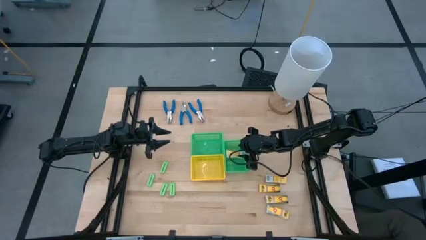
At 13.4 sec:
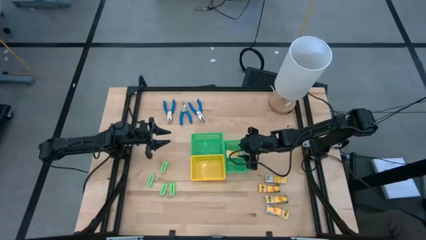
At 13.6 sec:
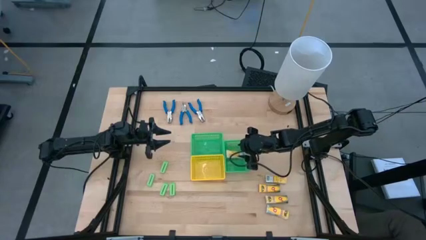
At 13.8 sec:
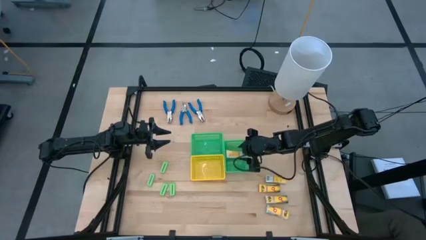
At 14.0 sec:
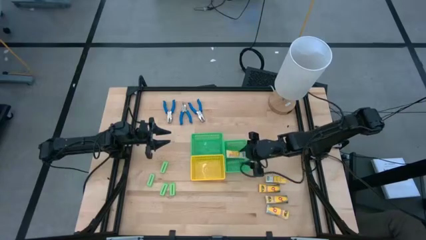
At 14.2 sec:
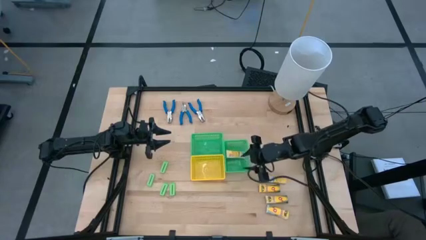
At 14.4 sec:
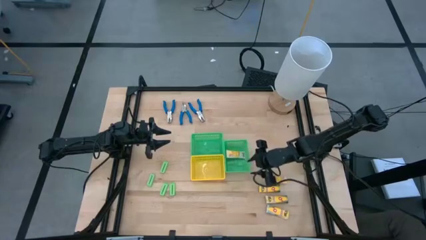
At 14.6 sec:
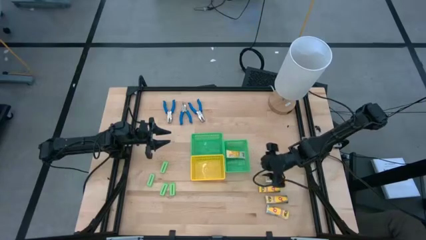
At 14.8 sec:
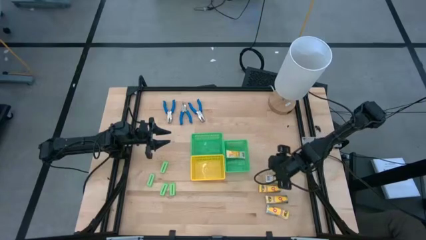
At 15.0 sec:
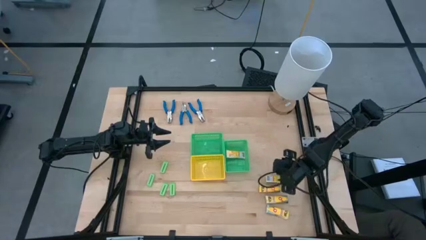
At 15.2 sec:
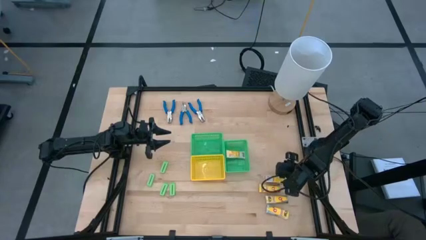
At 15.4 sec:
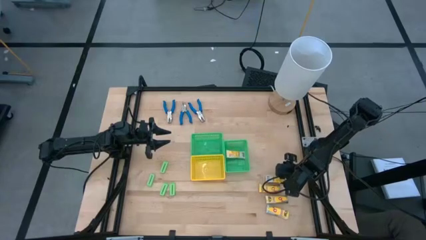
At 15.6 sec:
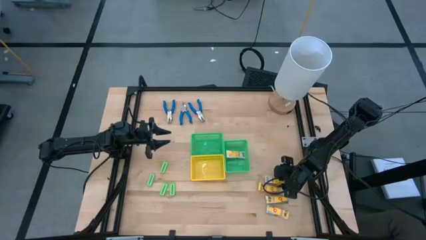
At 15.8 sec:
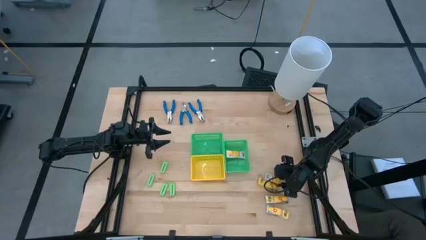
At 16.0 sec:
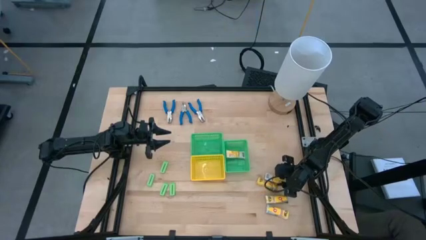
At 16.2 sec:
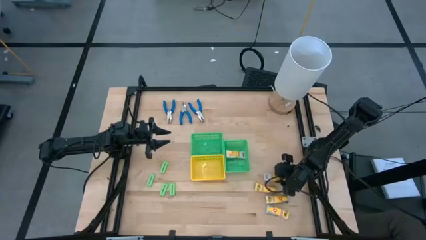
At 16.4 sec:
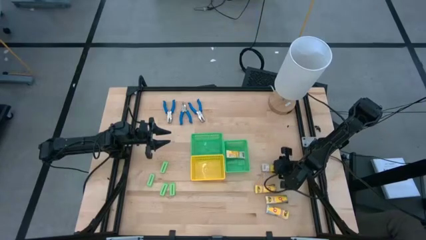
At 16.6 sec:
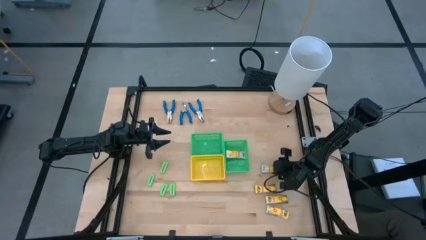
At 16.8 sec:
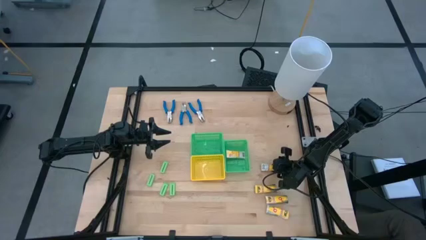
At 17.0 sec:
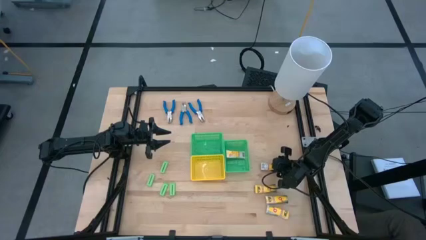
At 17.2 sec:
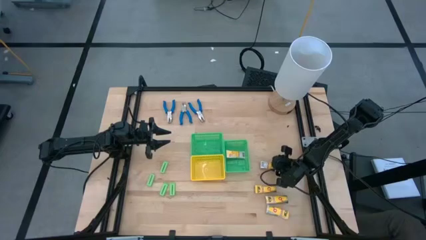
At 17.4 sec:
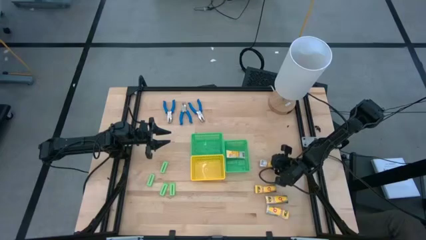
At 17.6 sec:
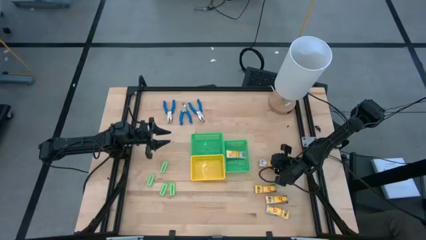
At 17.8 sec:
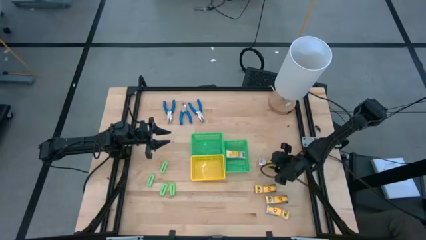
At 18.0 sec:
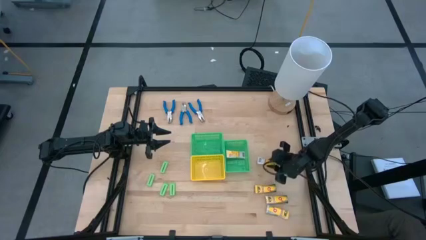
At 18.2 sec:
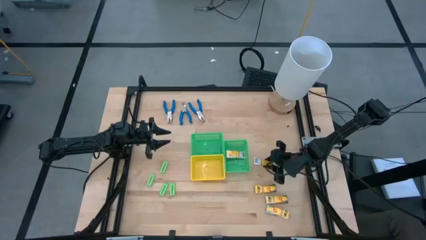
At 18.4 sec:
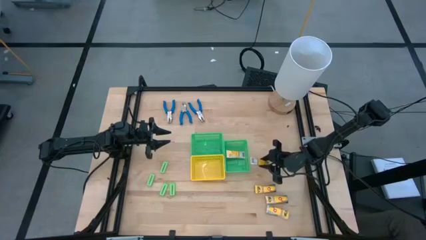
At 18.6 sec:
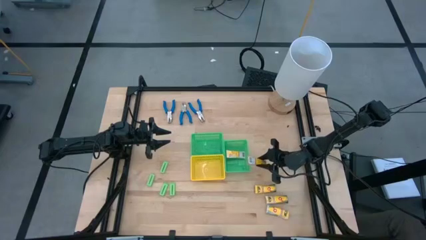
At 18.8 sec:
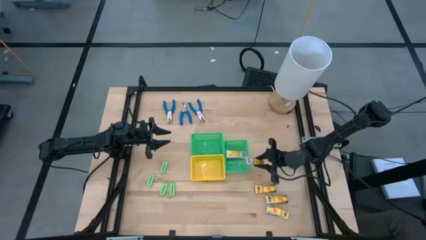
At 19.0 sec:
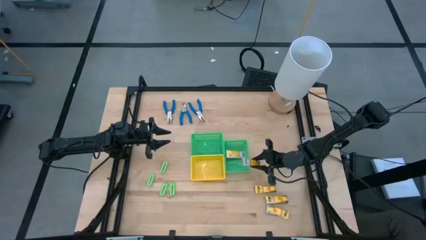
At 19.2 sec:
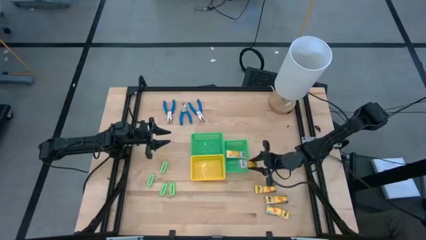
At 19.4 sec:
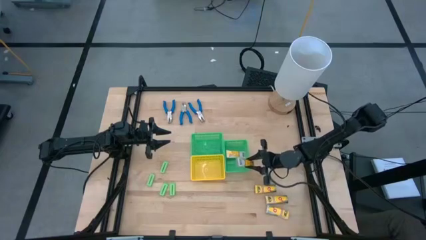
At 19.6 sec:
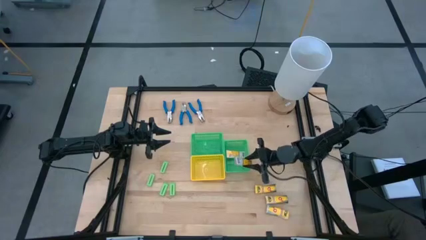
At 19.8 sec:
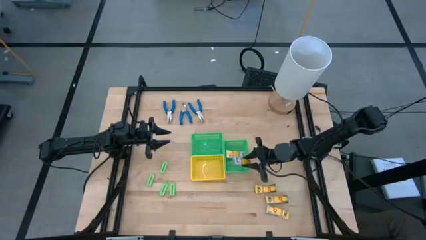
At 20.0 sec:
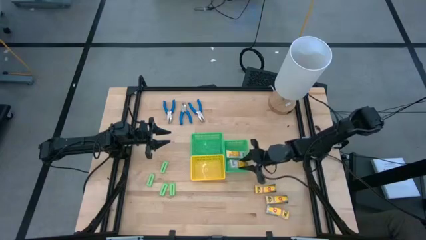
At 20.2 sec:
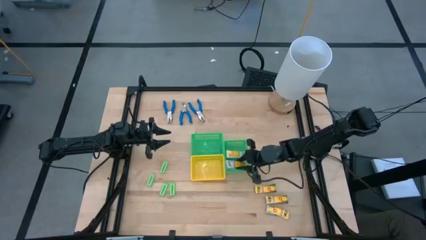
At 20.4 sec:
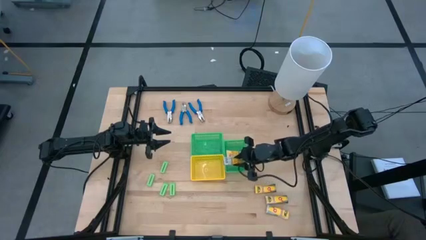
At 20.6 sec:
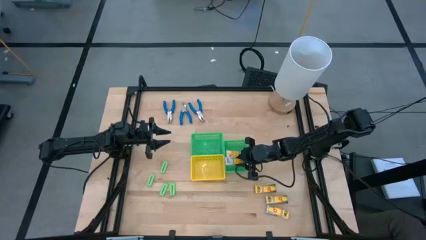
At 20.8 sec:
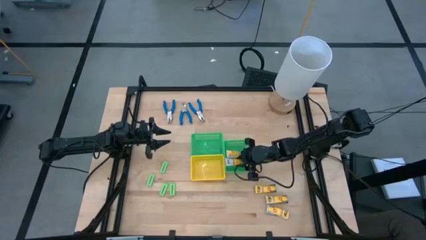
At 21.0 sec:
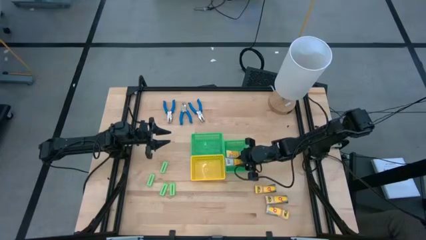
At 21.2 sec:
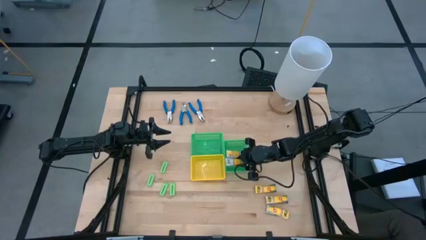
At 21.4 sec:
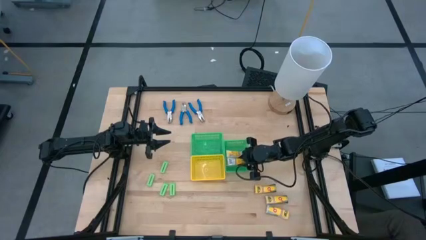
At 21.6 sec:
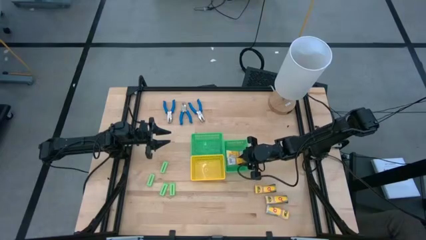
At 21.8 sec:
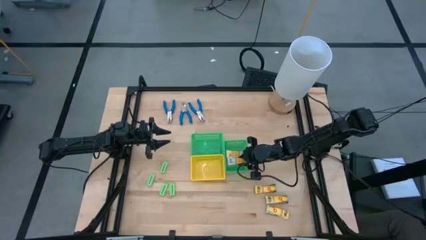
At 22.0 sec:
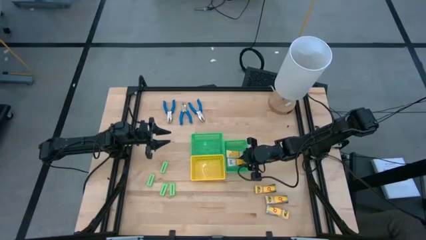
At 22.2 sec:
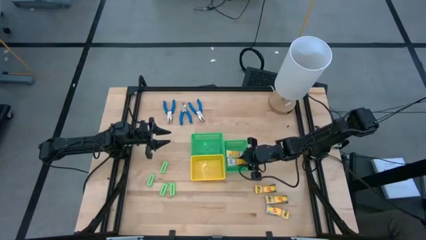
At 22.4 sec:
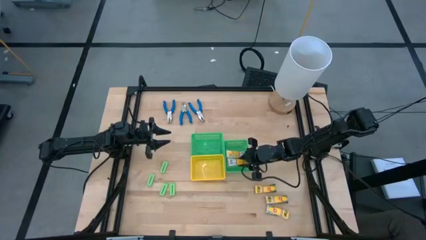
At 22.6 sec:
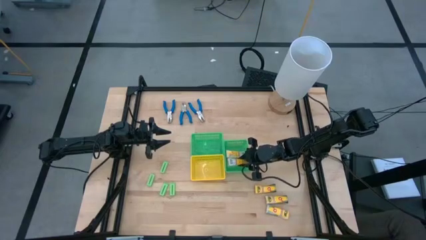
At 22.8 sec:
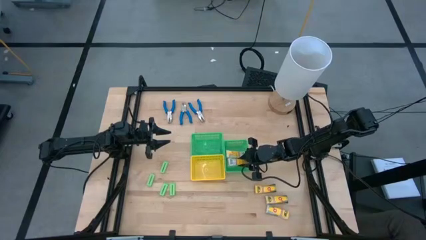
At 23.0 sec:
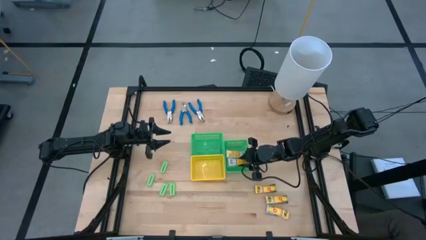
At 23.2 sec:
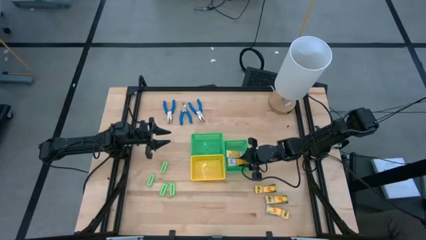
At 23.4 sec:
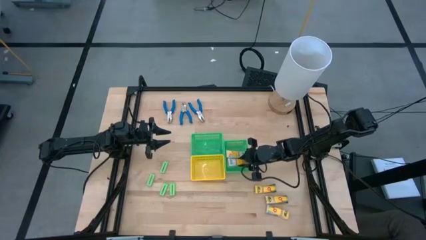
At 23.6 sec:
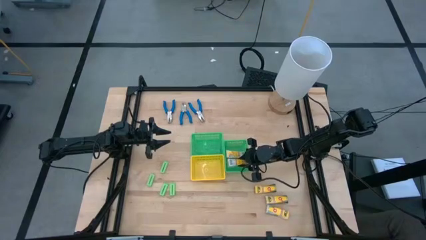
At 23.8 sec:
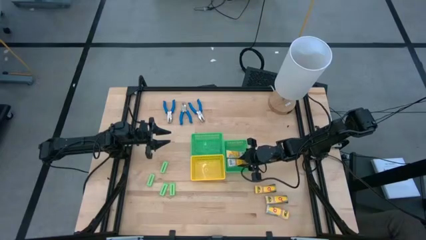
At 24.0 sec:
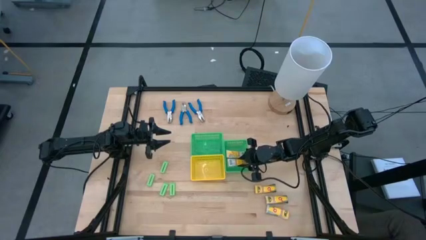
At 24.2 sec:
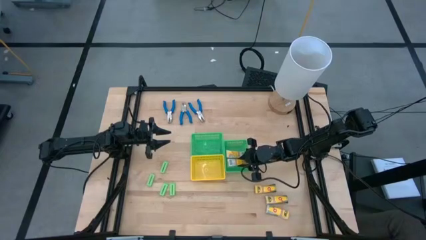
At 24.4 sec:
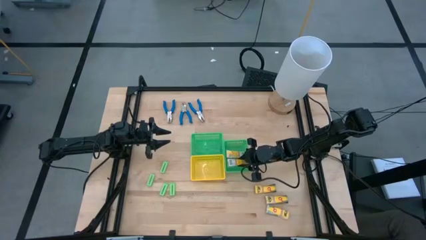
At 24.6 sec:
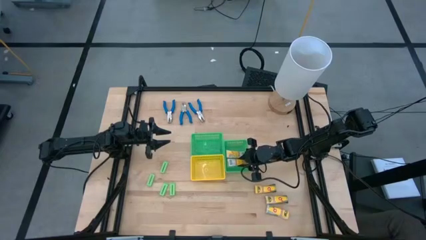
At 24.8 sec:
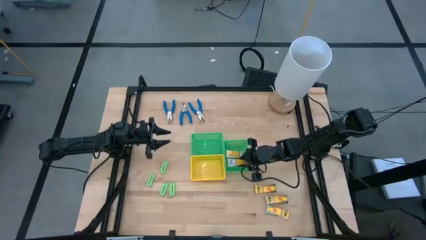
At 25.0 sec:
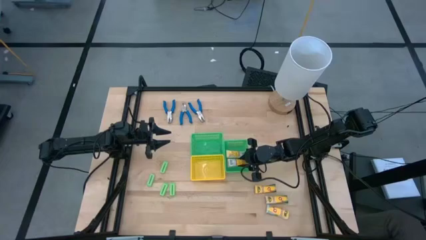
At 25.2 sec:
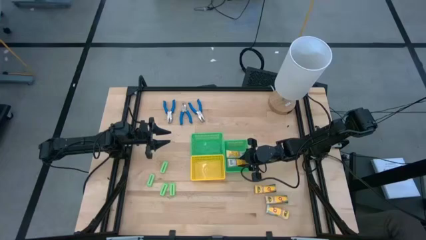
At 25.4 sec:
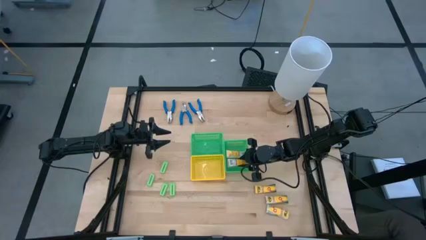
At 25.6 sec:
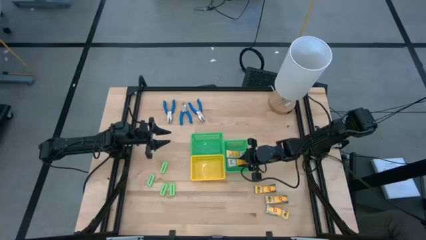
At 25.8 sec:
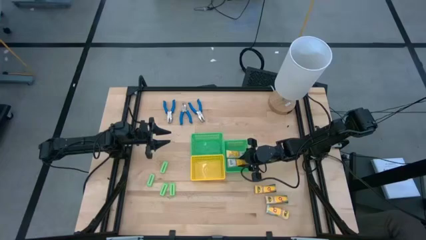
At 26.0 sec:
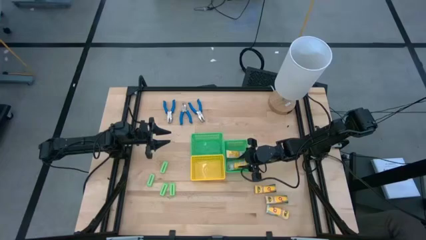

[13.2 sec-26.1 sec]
Task: Pick & Place School Supplies
Put the yellow crayon box into the right green bin
